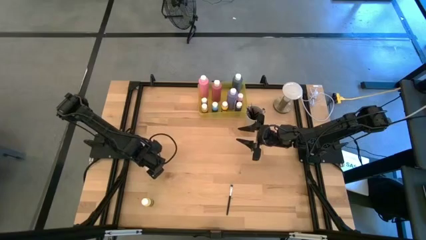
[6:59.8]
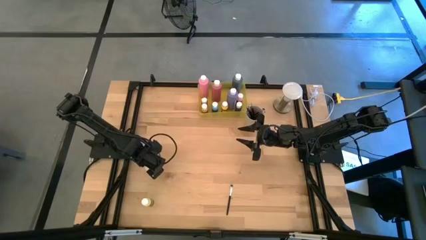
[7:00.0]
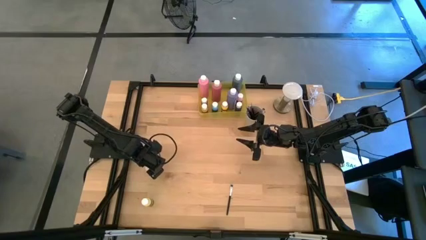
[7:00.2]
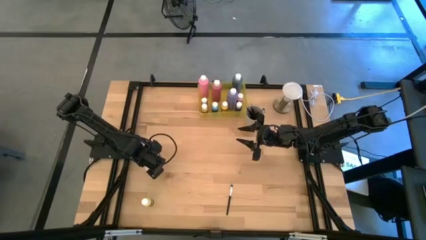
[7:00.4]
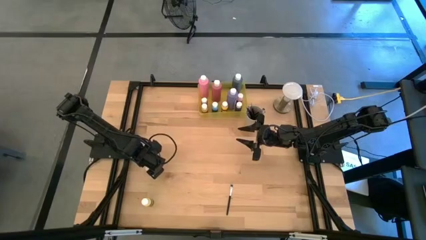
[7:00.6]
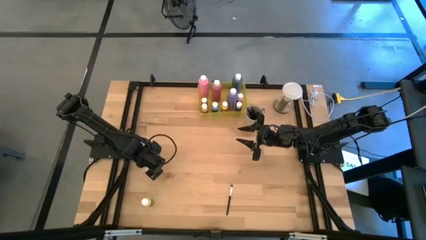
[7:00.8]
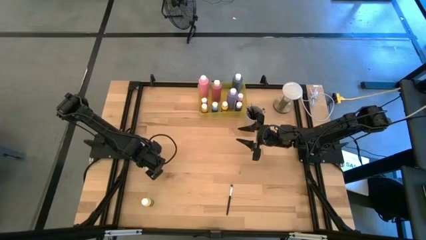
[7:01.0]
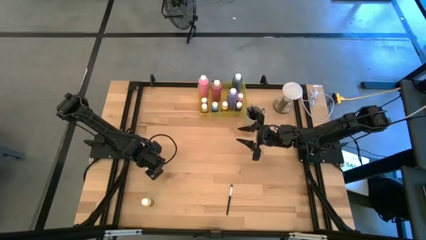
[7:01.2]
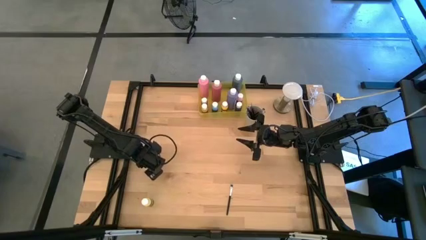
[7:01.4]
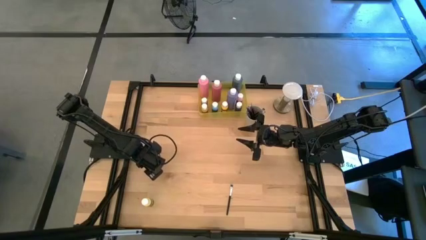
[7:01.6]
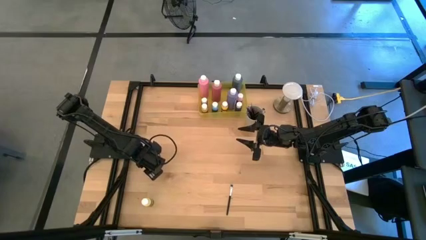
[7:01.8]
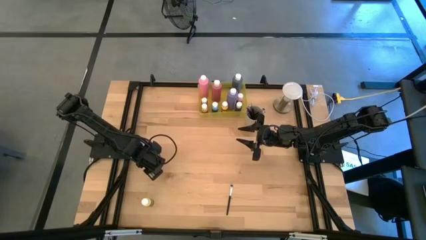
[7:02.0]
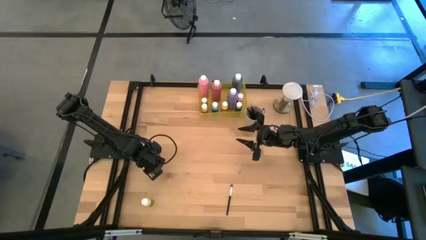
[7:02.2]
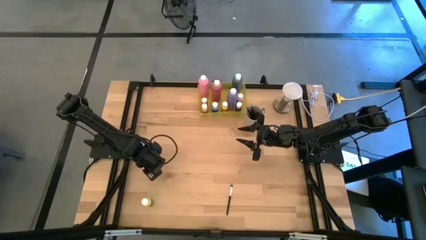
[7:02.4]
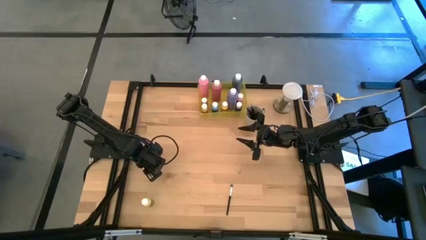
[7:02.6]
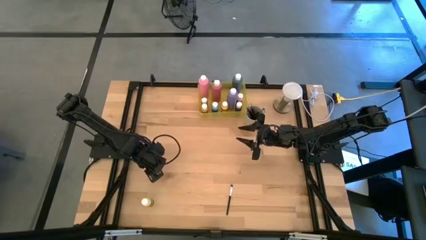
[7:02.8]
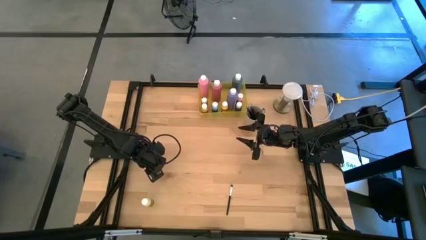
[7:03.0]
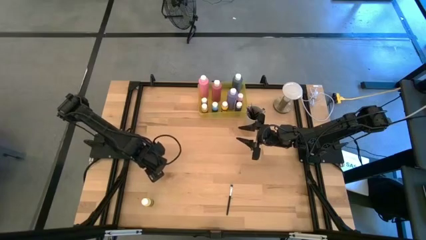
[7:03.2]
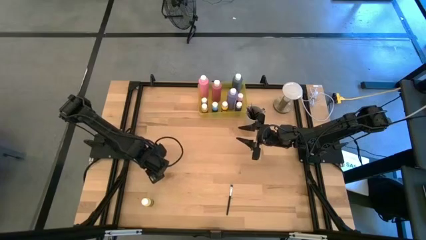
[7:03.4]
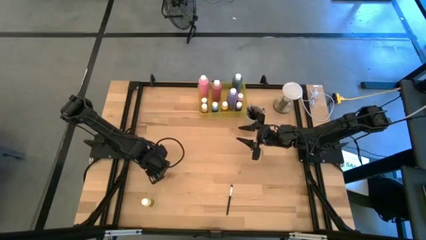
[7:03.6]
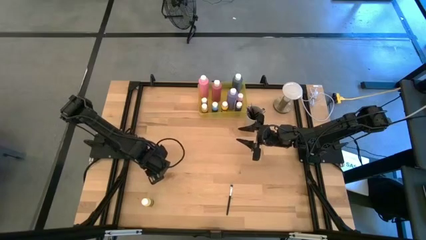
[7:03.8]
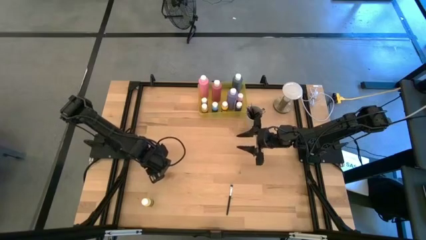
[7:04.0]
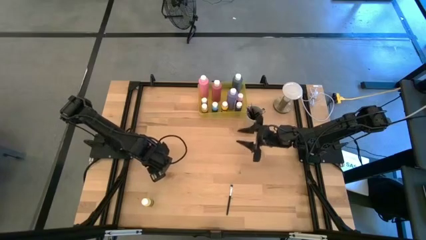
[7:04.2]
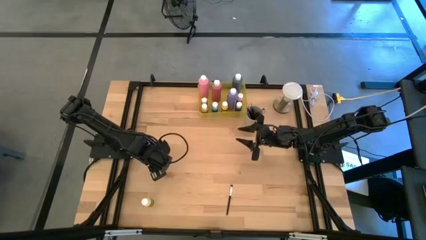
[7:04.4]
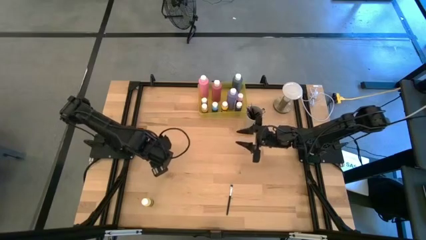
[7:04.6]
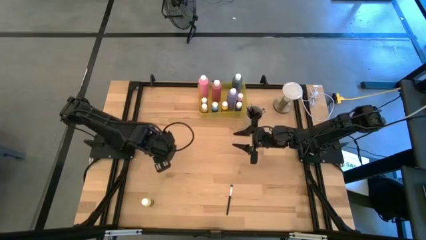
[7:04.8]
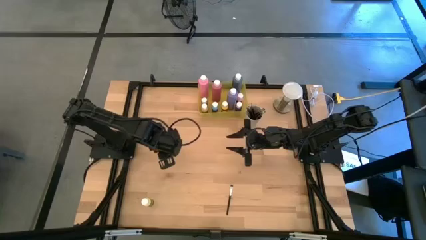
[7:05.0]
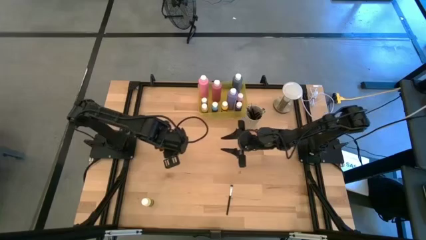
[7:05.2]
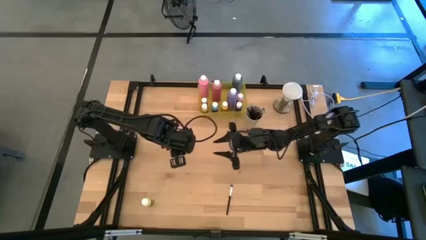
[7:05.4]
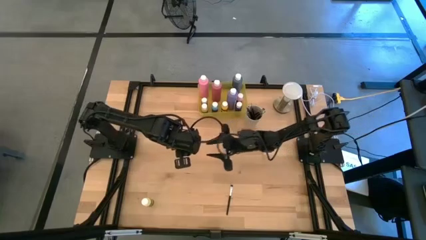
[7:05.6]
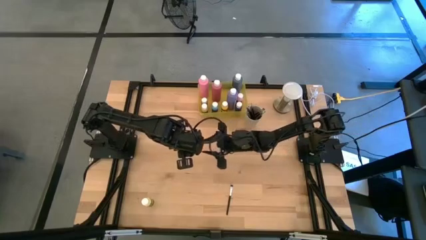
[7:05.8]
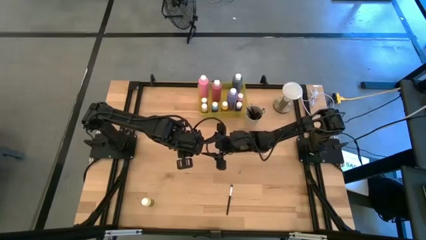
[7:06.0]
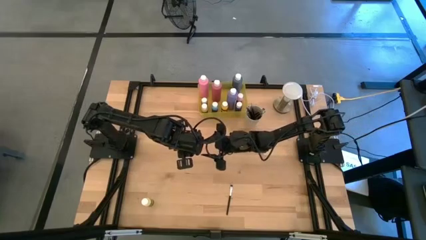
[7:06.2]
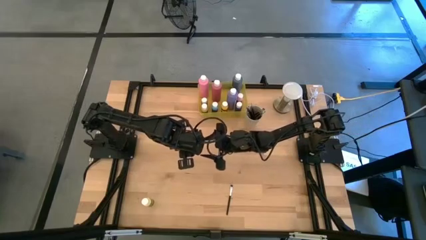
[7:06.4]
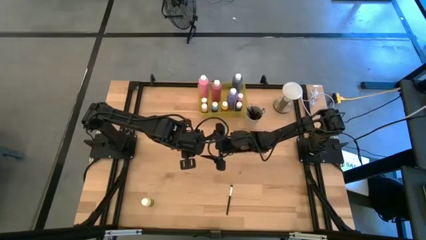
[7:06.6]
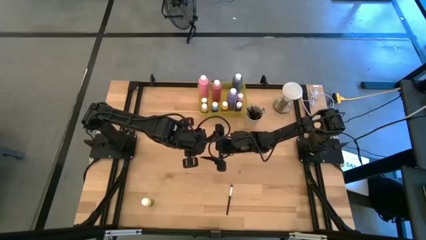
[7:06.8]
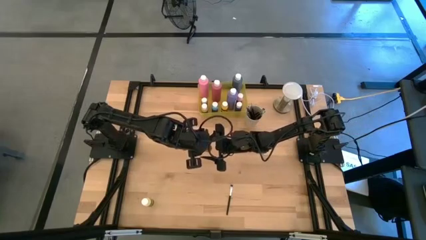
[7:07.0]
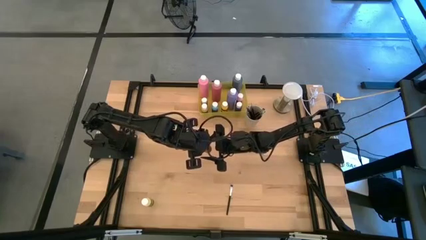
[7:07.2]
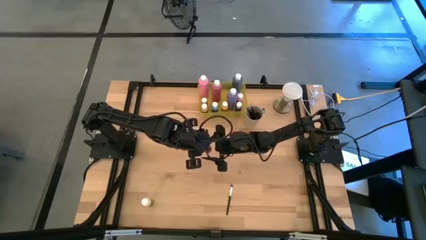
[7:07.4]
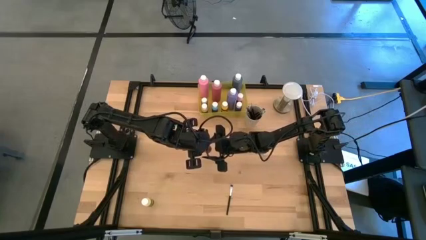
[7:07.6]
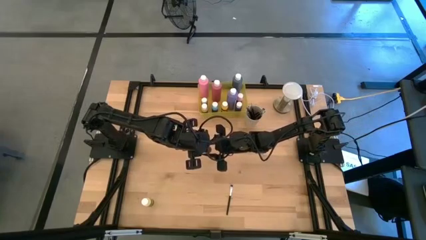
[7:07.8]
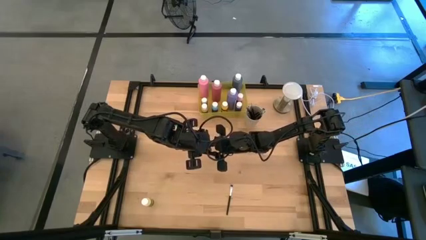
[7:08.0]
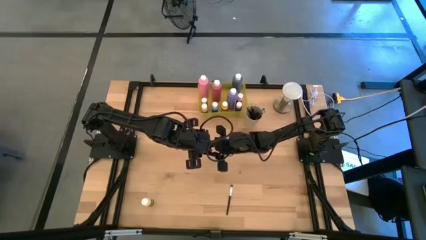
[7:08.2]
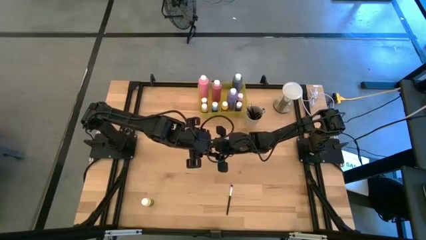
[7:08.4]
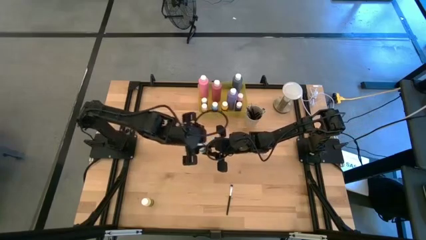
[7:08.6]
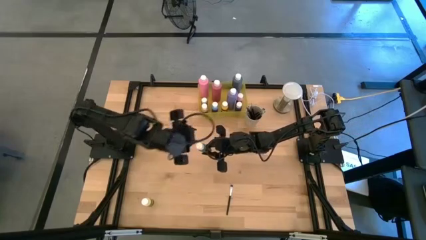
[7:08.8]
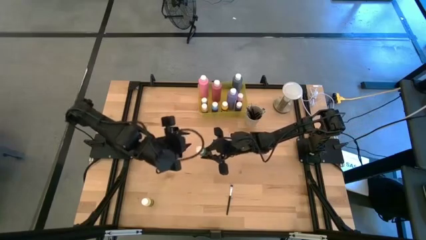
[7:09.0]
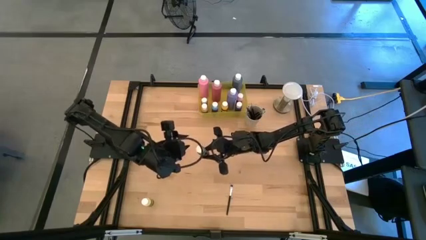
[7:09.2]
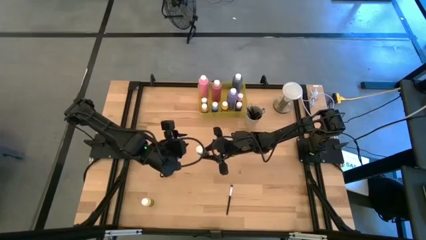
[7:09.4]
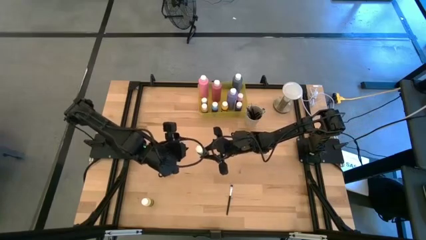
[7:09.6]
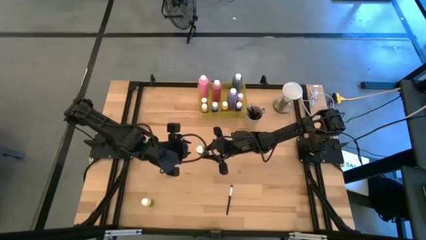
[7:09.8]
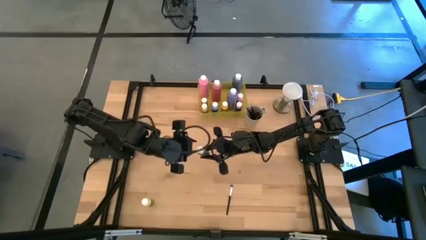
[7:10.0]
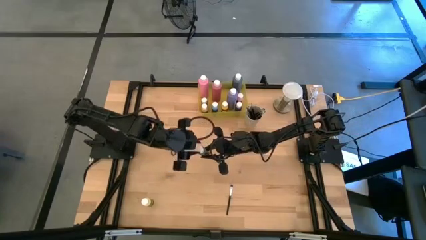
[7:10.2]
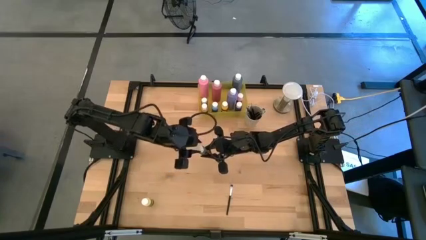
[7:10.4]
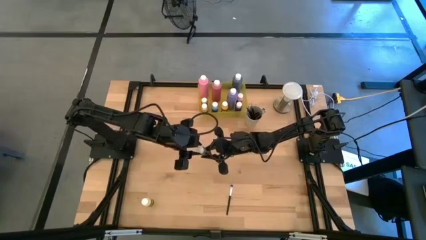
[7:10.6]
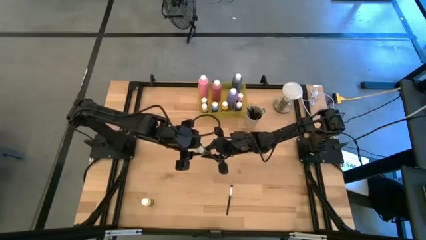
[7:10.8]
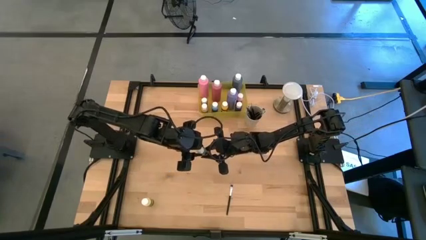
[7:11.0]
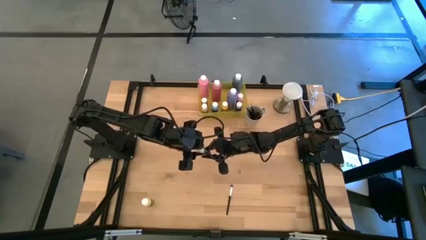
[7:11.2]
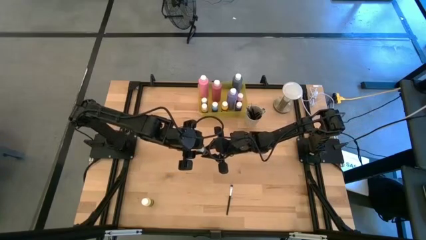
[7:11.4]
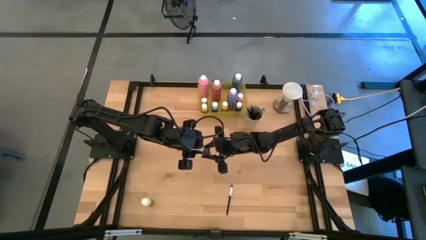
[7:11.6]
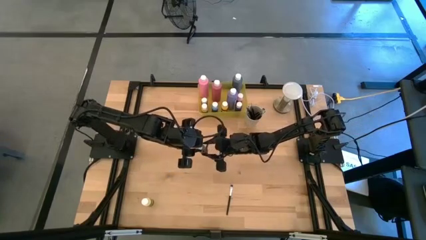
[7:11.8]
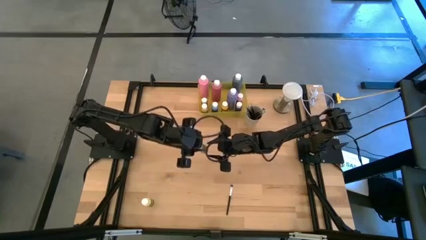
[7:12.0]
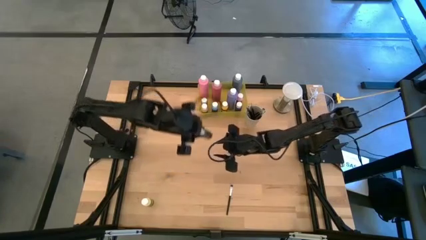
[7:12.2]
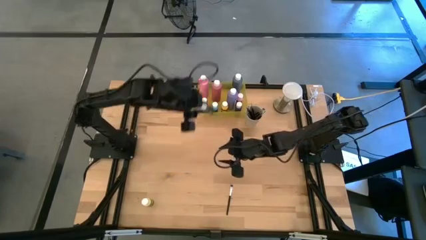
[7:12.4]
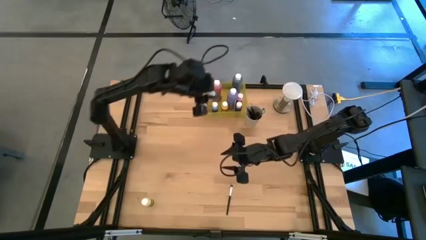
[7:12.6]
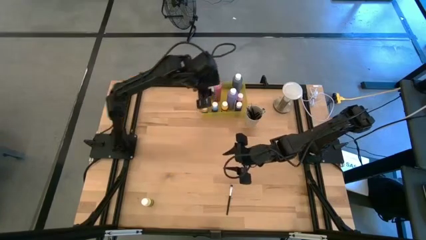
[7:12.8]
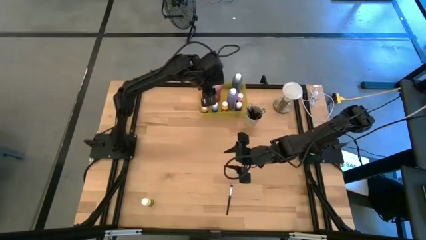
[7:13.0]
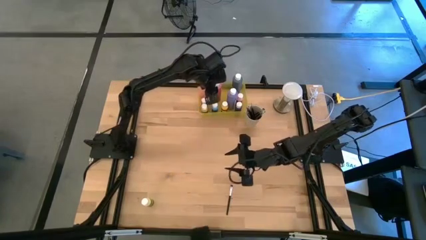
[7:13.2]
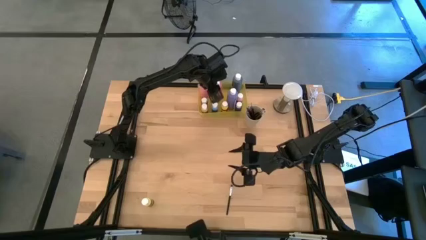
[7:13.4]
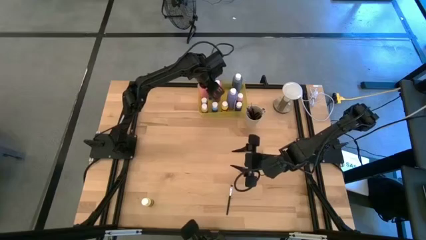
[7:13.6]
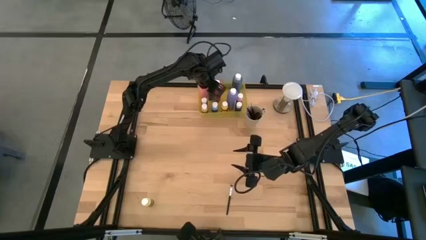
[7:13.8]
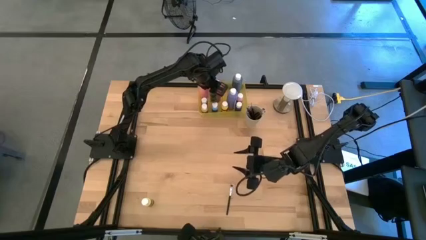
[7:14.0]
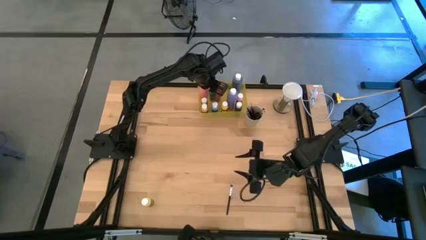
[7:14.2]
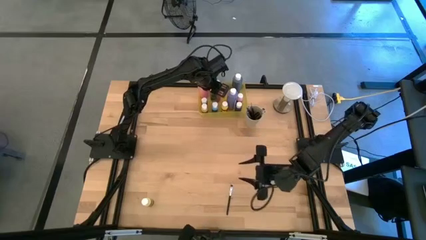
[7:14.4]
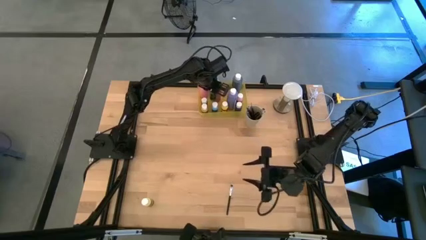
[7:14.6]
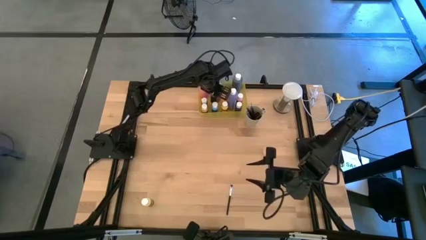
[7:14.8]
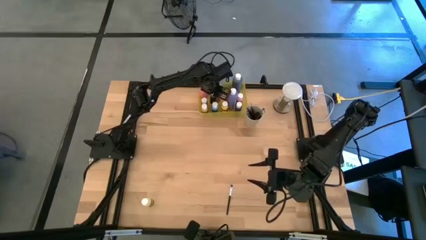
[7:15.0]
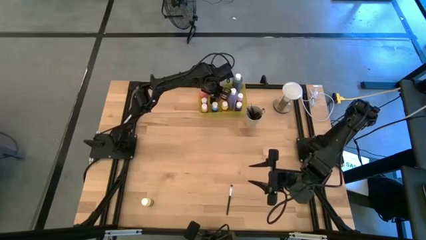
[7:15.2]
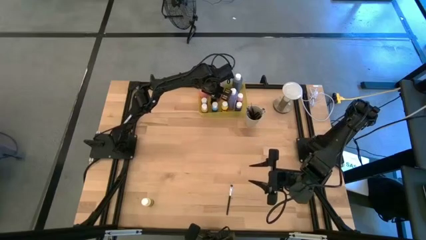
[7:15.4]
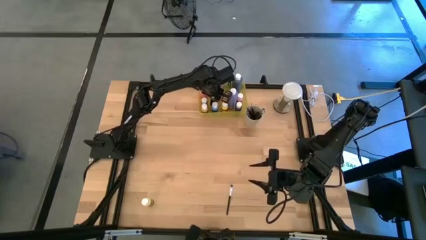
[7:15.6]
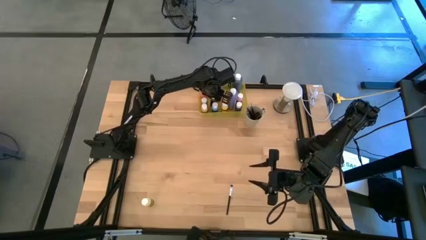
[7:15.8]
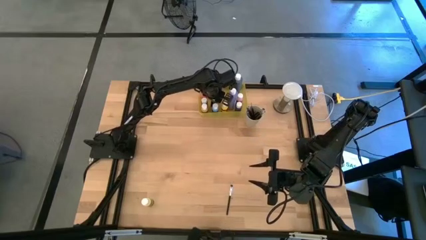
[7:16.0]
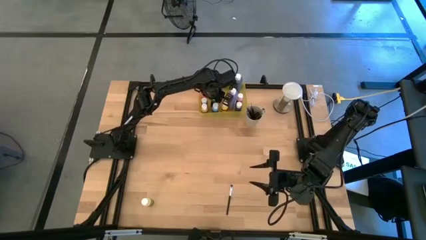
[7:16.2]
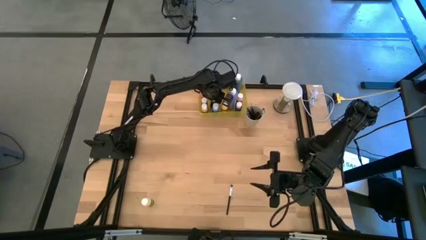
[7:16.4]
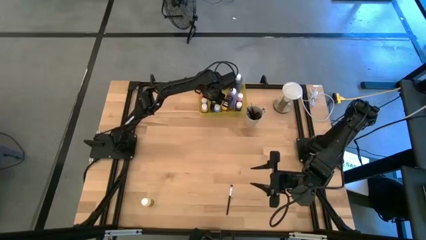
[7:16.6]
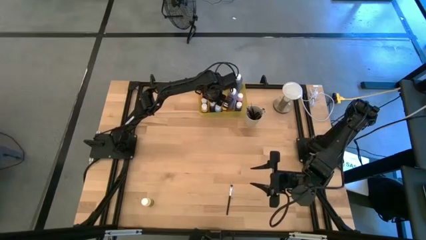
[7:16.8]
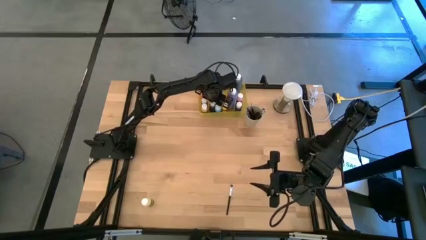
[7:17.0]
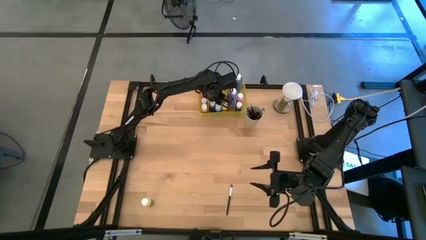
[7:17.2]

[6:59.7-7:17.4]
Task: Pick & Place Paint Supplies
Put the small green paint bottle into the yellow bin
